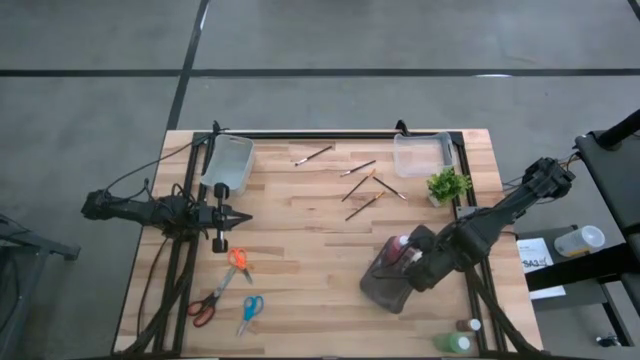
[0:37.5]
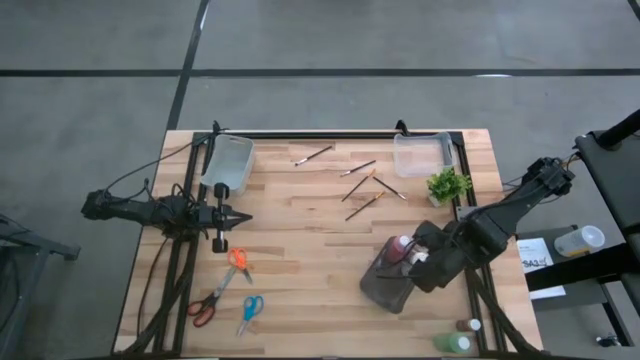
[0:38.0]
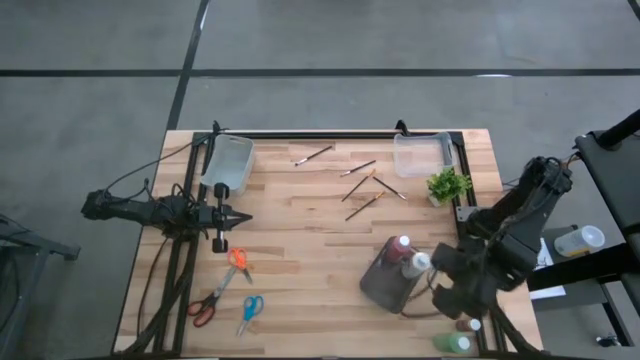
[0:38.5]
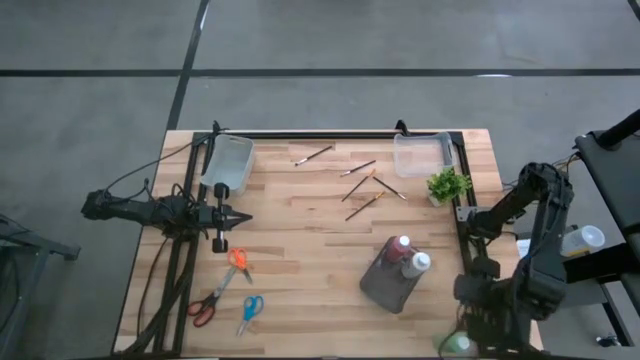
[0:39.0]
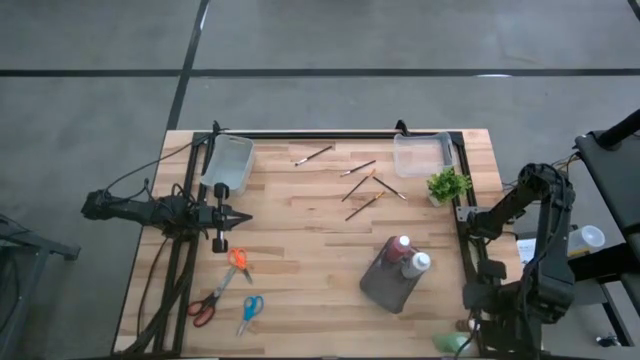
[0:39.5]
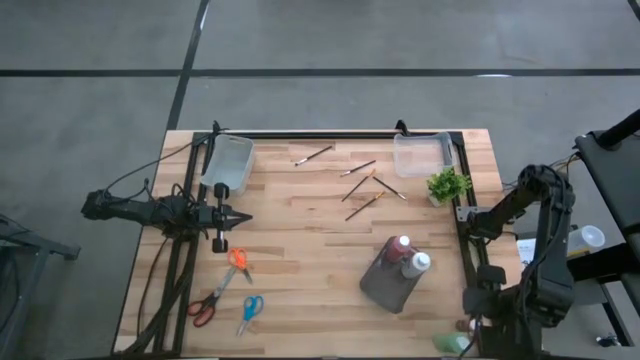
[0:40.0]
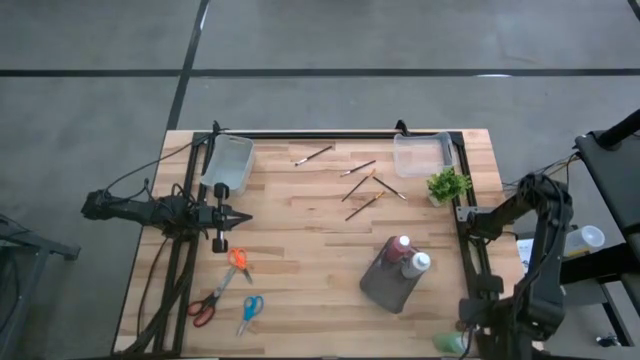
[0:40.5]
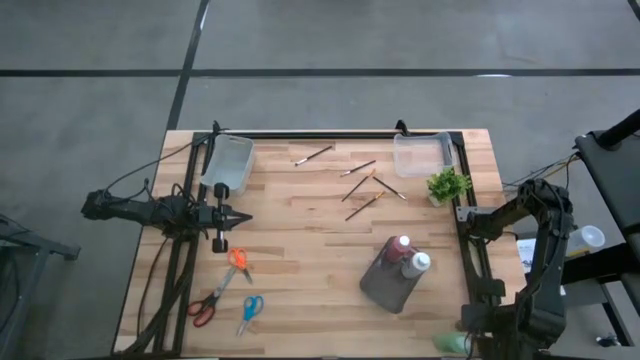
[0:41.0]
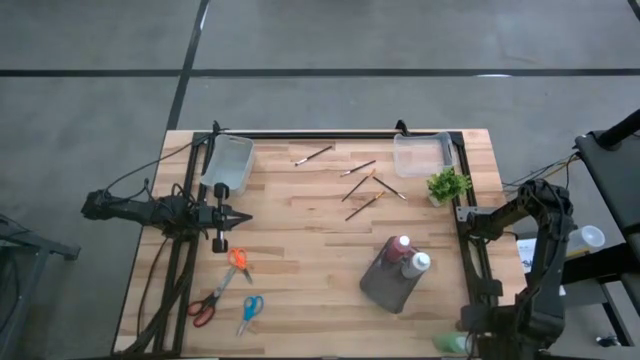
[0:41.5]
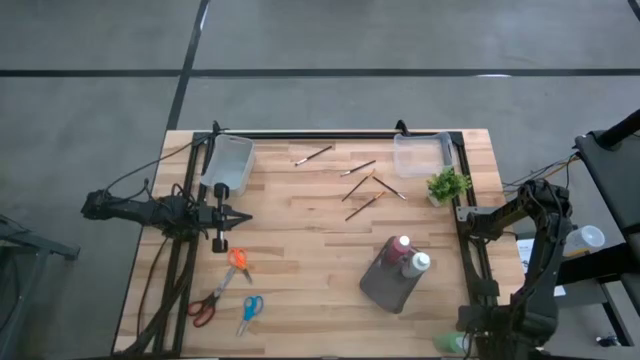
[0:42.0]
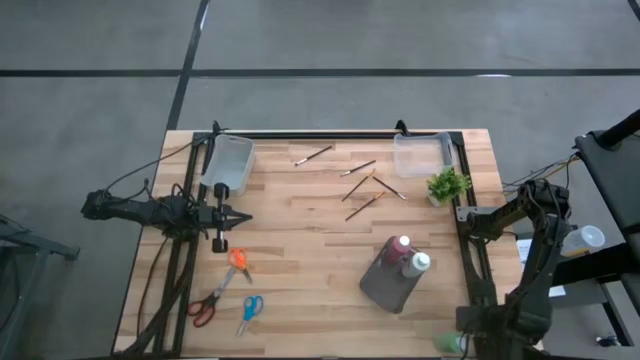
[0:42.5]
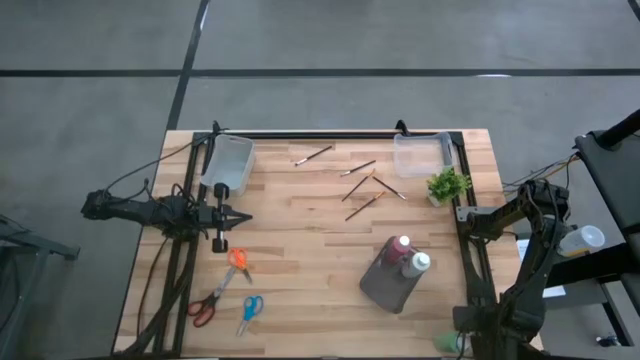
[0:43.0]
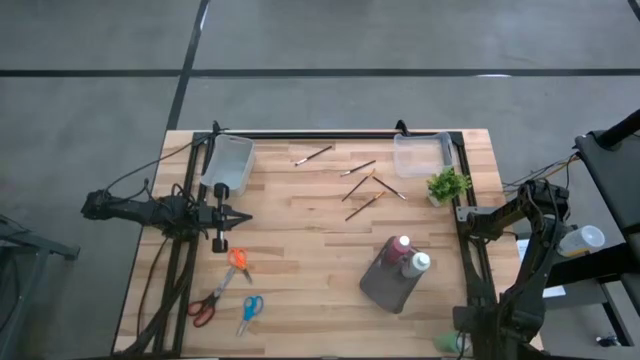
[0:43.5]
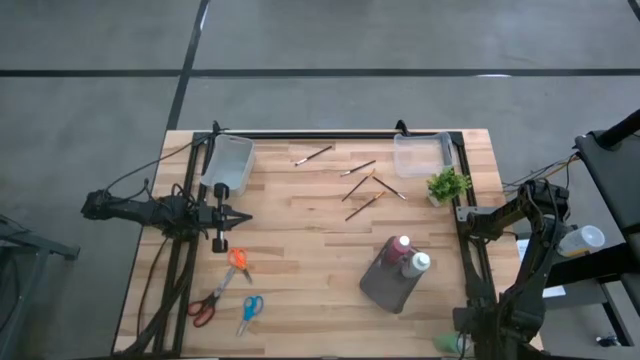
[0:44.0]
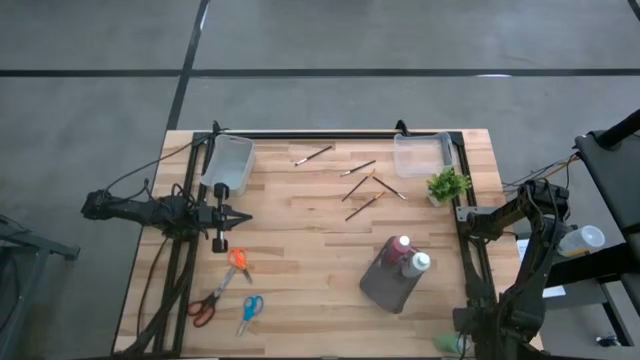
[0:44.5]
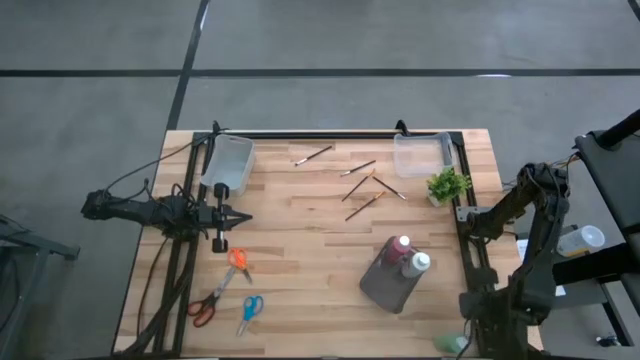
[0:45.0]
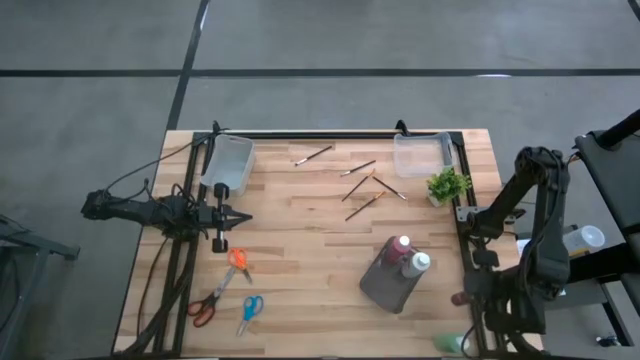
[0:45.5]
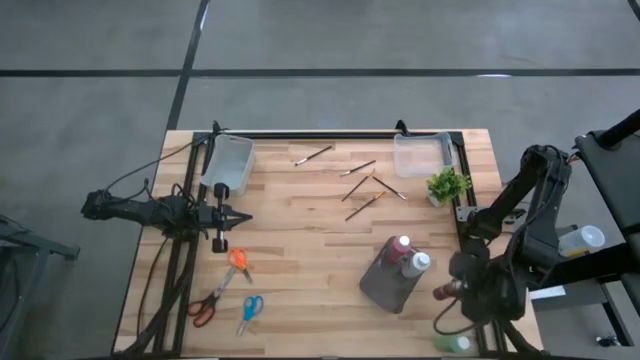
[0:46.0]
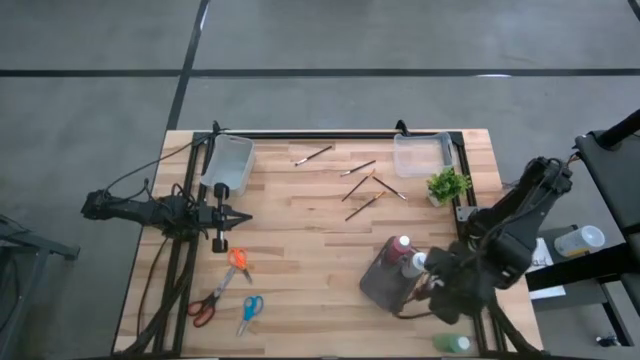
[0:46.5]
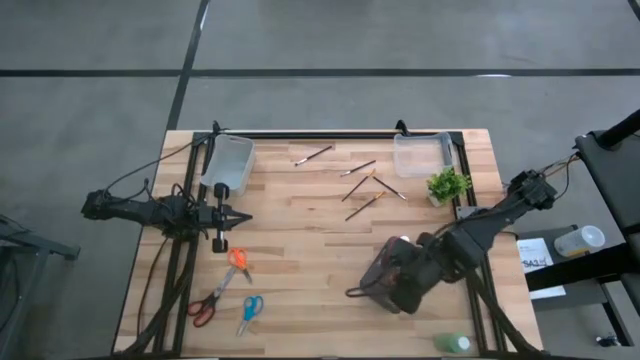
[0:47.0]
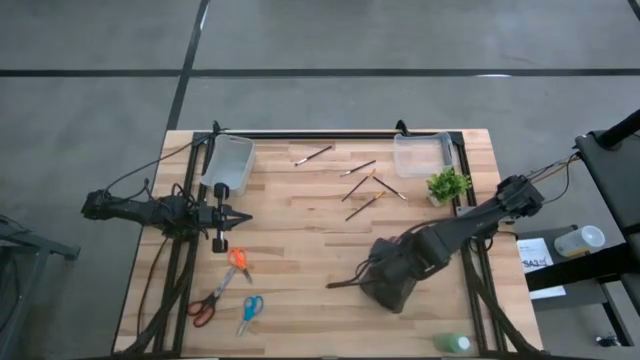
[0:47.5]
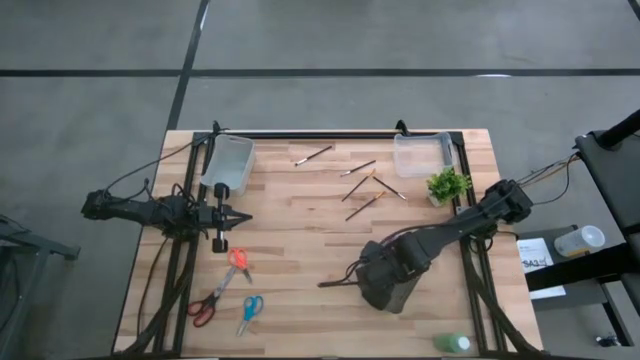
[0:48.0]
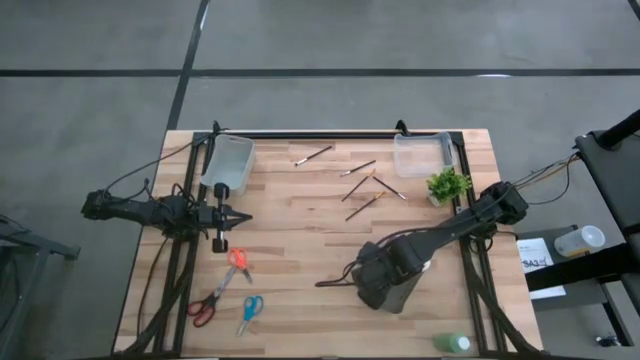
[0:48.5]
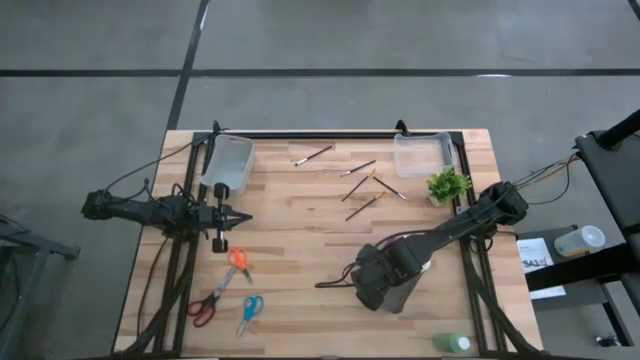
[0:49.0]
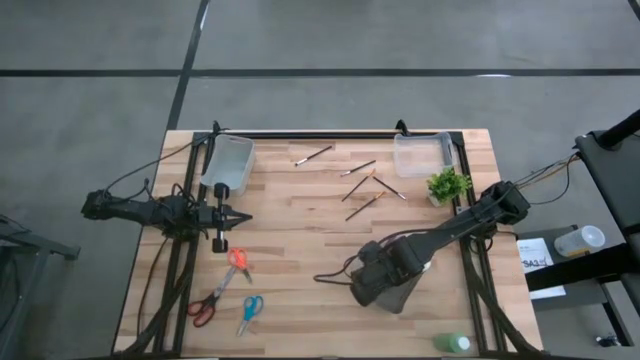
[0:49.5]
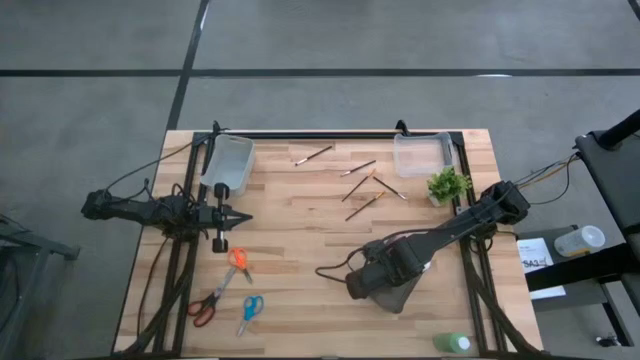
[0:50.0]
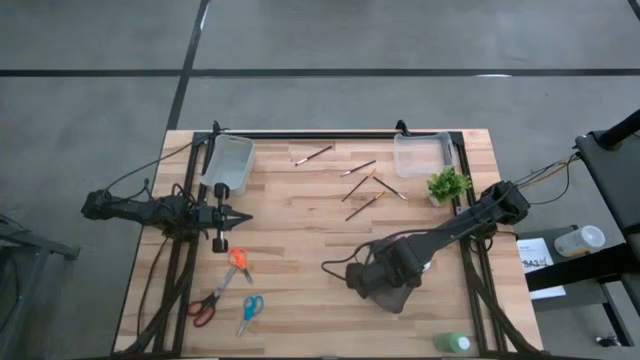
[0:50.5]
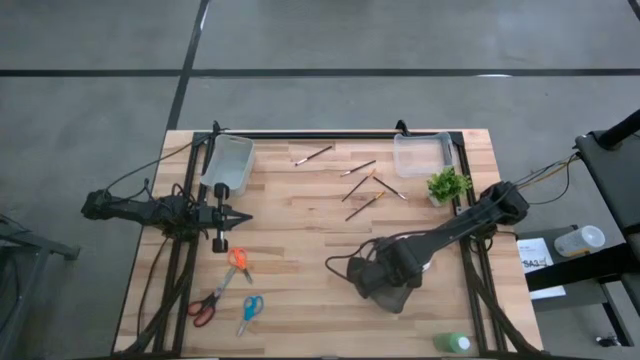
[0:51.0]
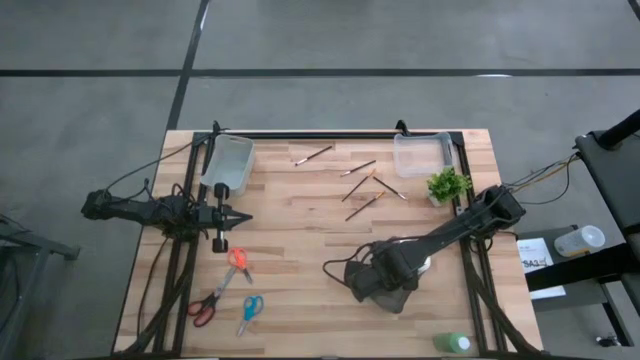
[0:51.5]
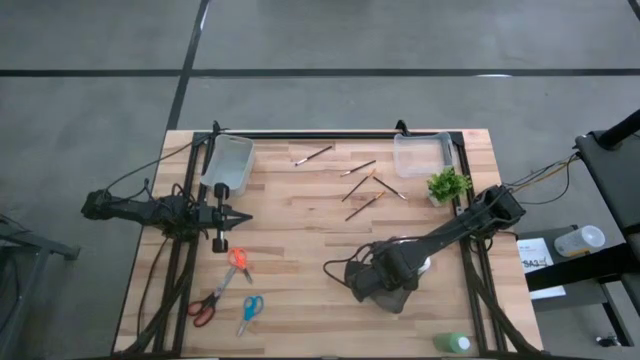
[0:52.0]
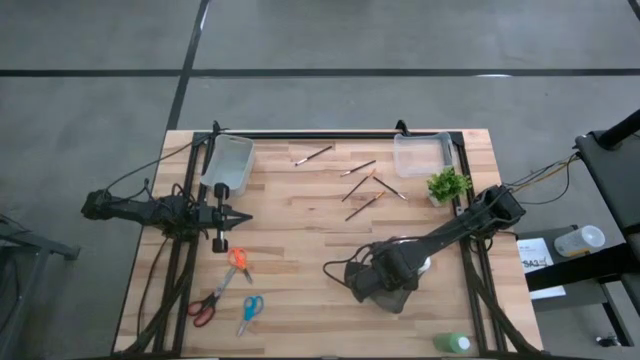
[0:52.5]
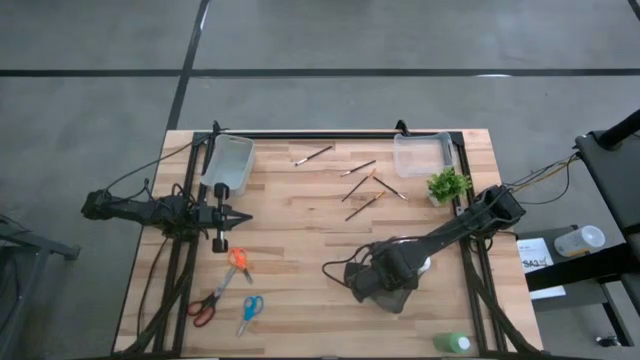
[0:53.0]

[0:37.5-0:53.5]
Task: Pick & Place Paint Supplies
Put the brown paint bottle into the black bin

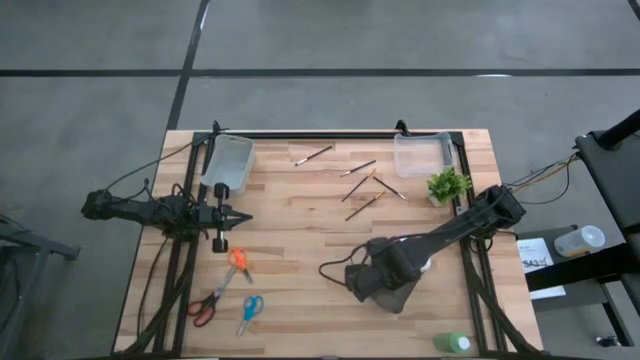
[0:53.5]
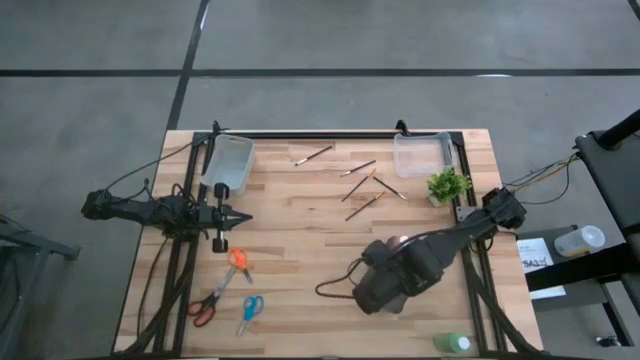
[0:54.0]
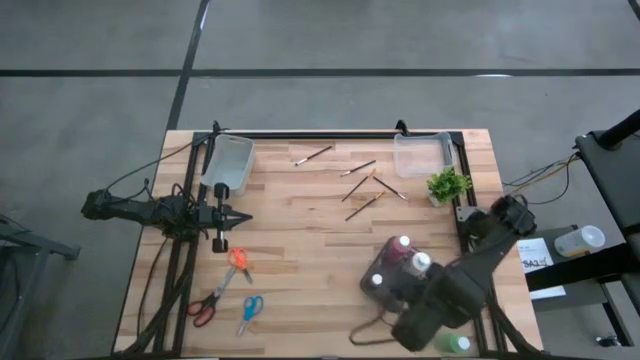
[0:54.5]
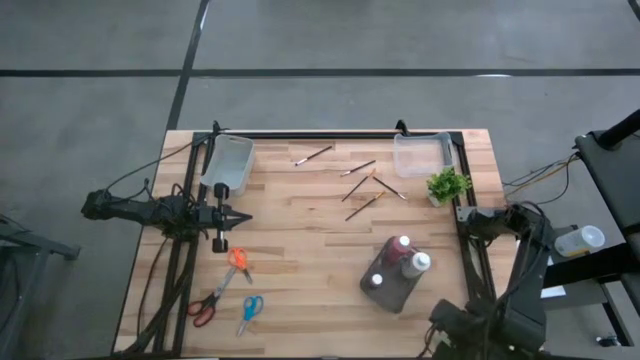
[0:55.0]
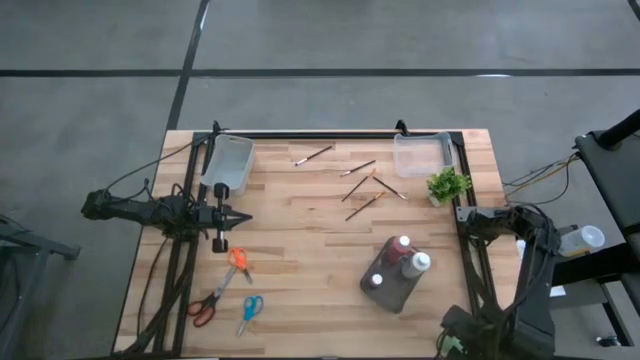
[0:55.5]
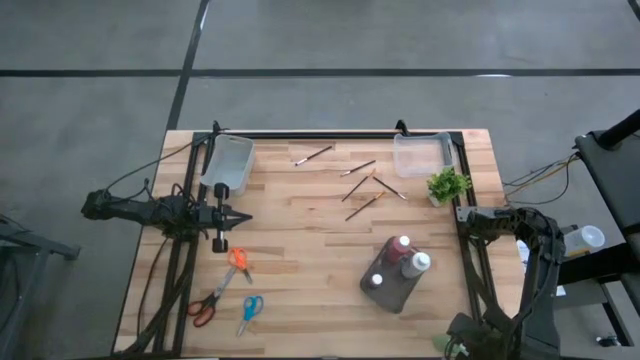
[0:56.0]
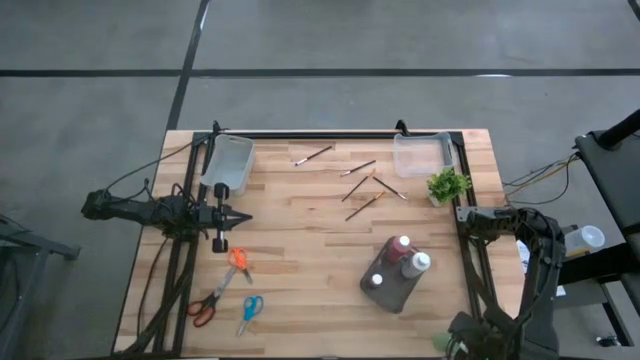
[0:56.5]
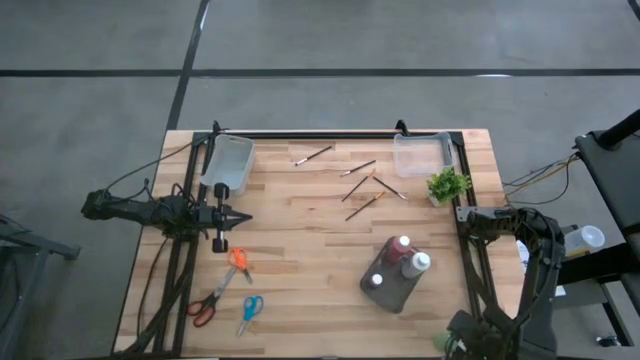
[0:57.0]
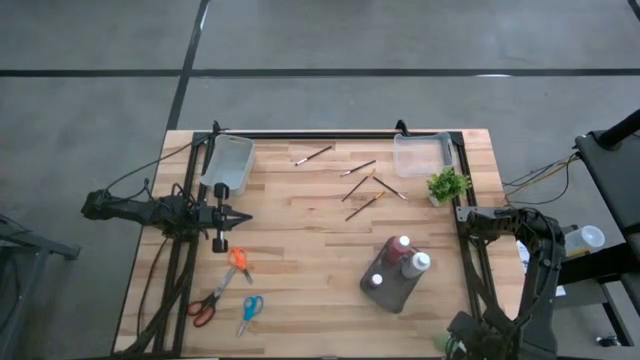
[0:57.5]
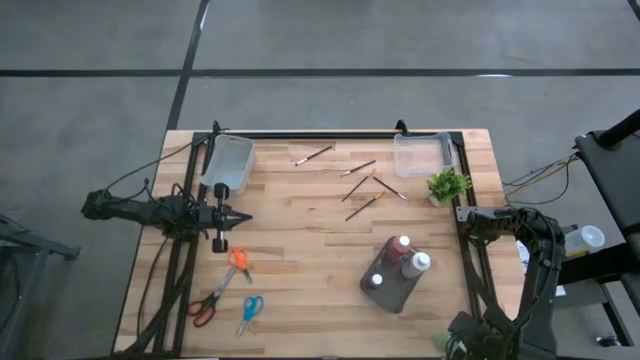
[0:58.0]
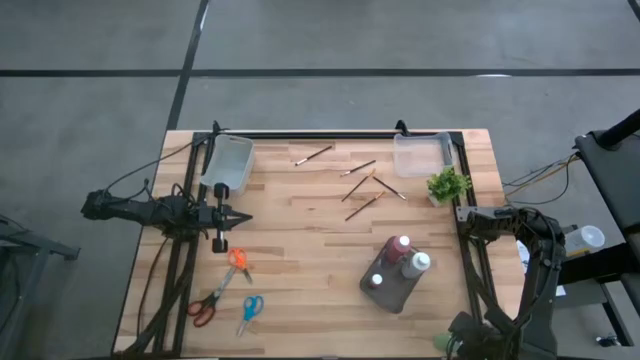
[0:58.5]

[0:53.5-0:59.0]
Put the green paint bottle into the black bin
